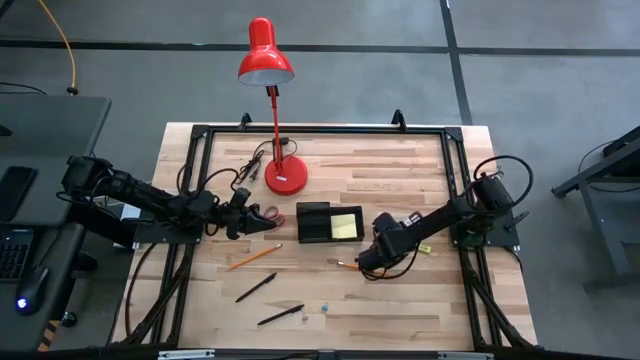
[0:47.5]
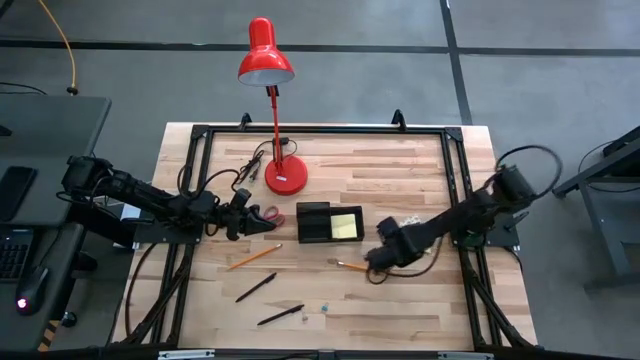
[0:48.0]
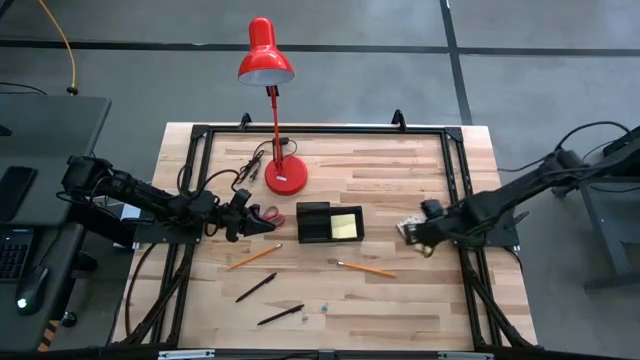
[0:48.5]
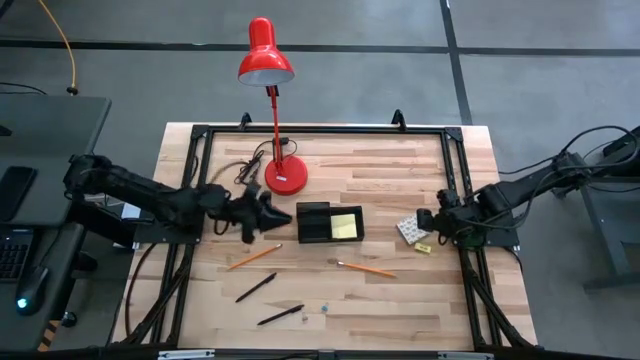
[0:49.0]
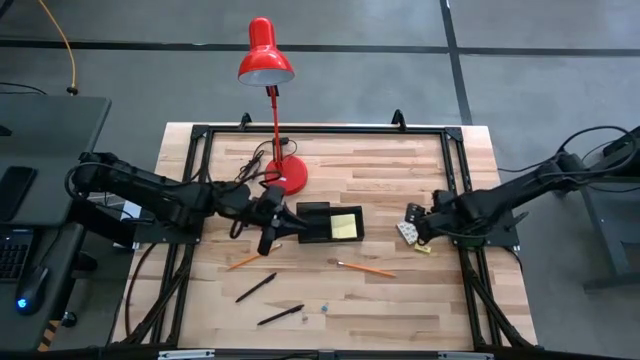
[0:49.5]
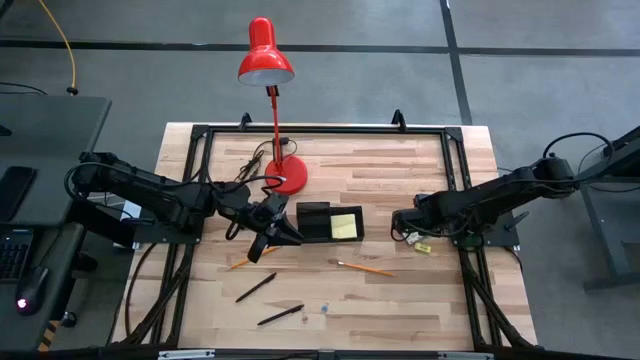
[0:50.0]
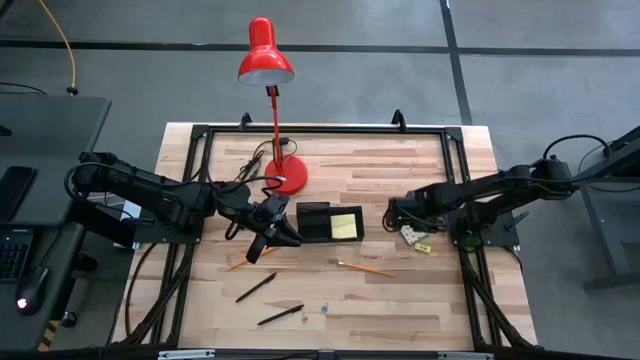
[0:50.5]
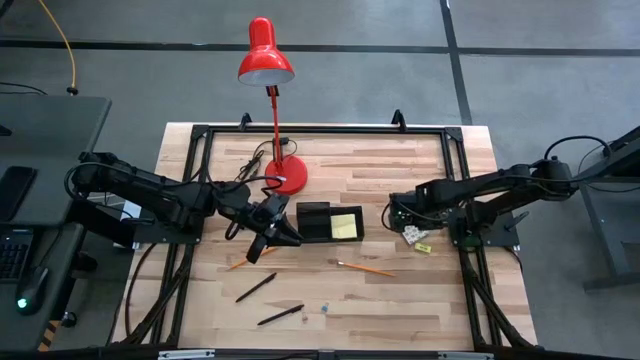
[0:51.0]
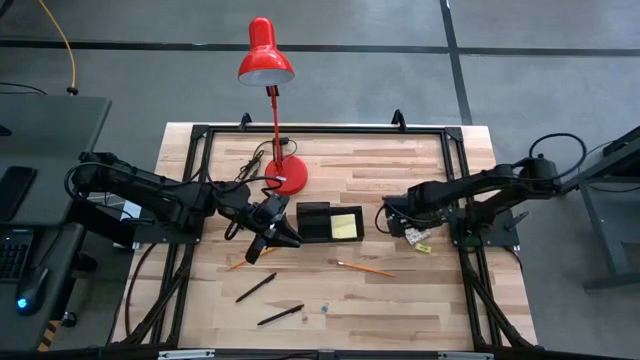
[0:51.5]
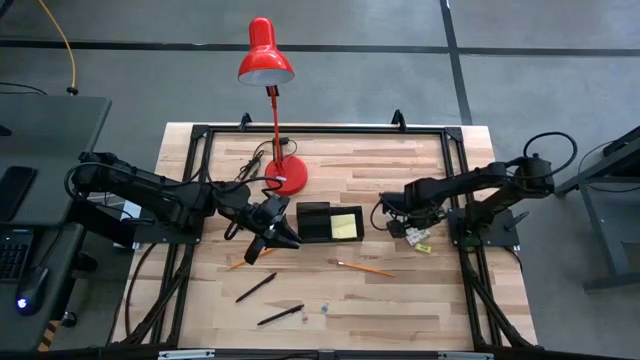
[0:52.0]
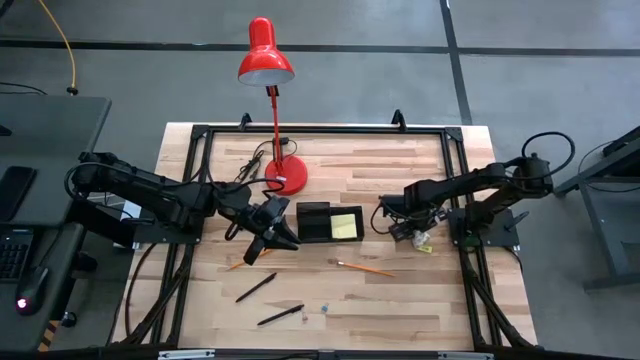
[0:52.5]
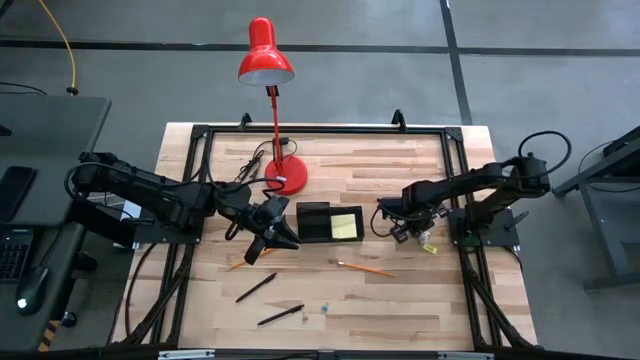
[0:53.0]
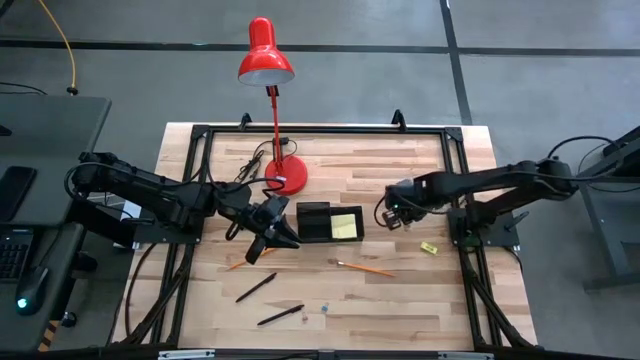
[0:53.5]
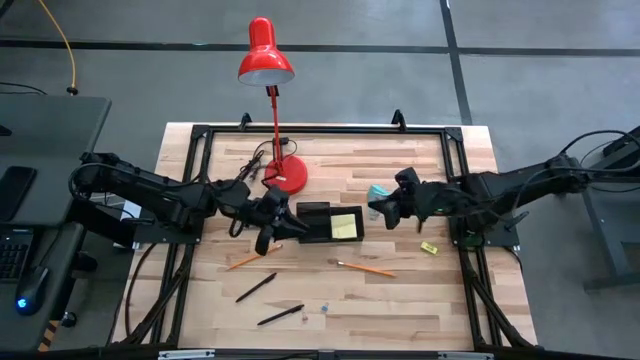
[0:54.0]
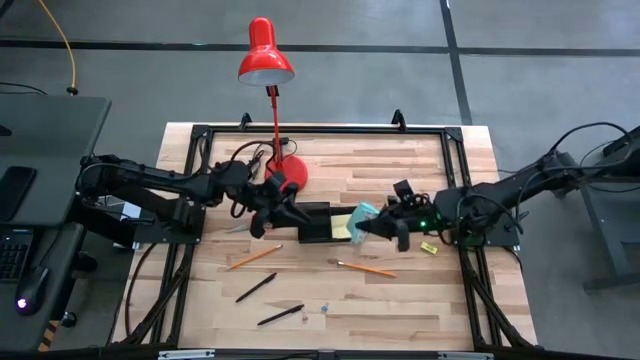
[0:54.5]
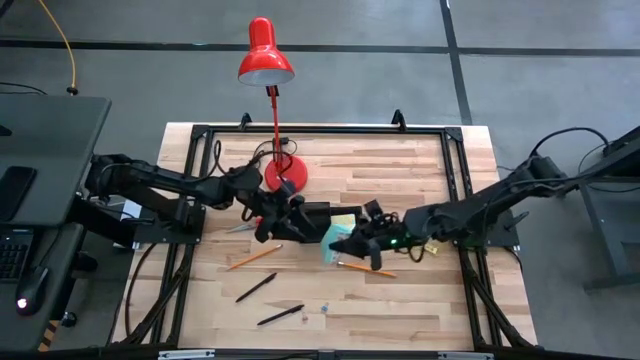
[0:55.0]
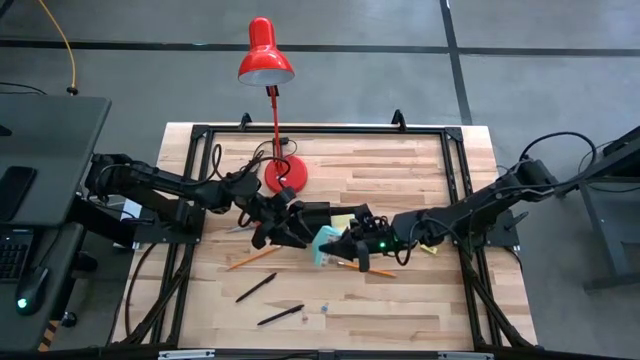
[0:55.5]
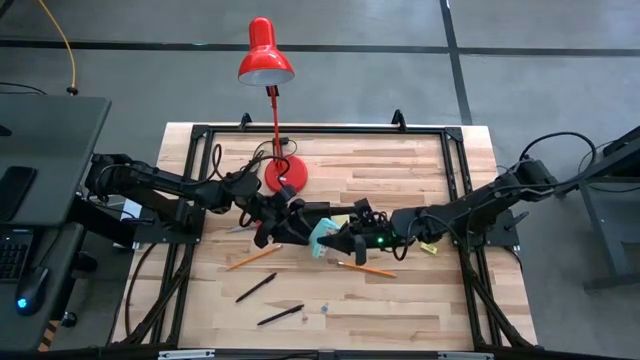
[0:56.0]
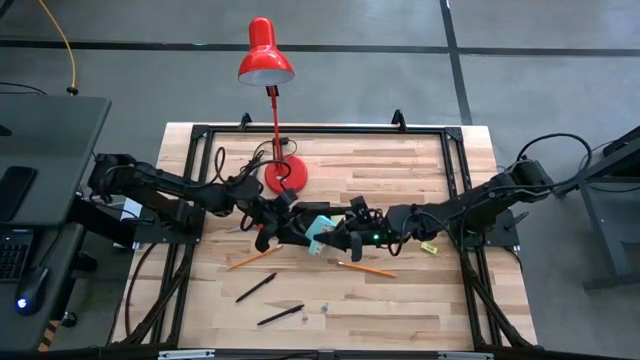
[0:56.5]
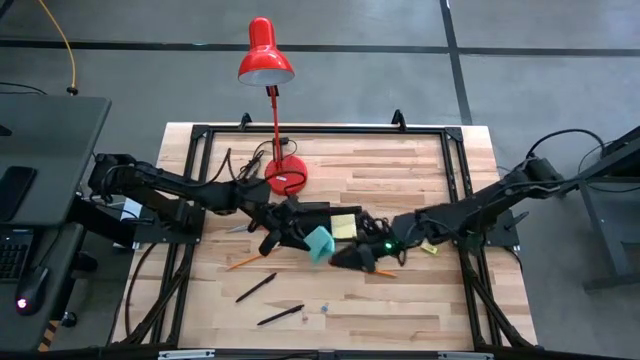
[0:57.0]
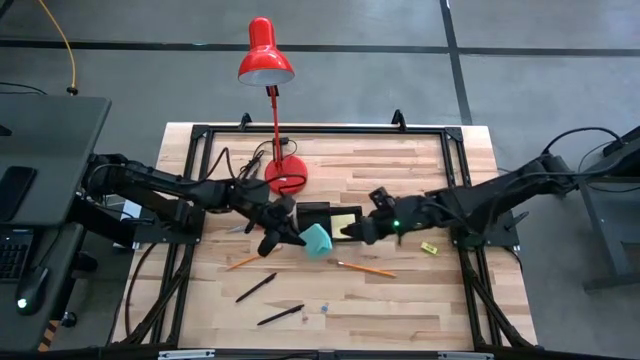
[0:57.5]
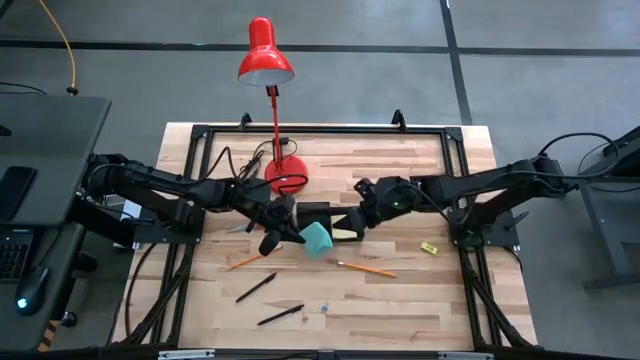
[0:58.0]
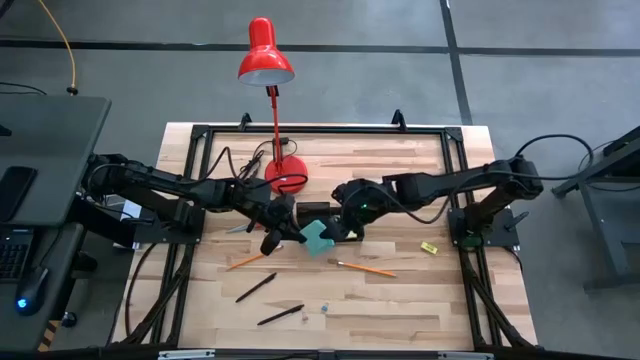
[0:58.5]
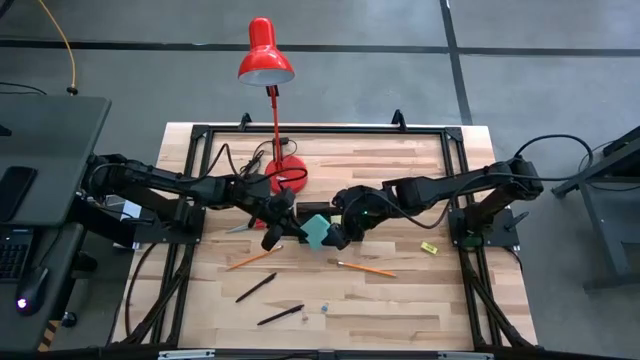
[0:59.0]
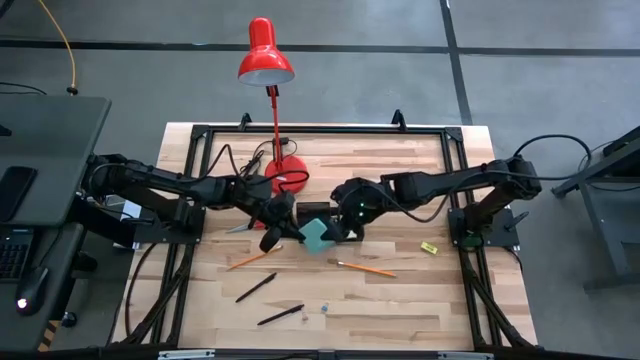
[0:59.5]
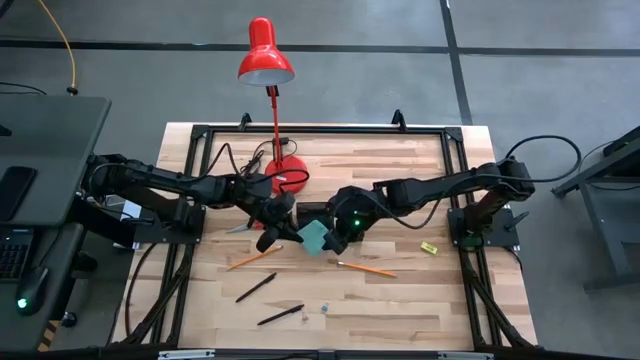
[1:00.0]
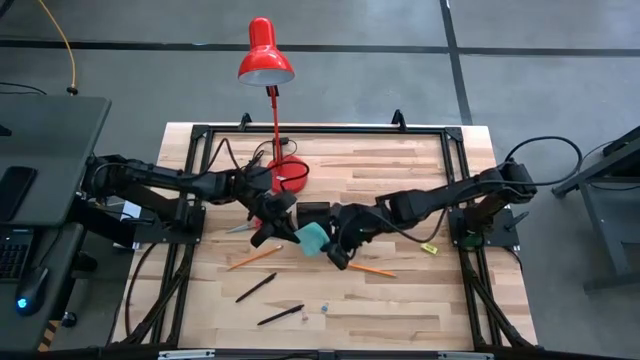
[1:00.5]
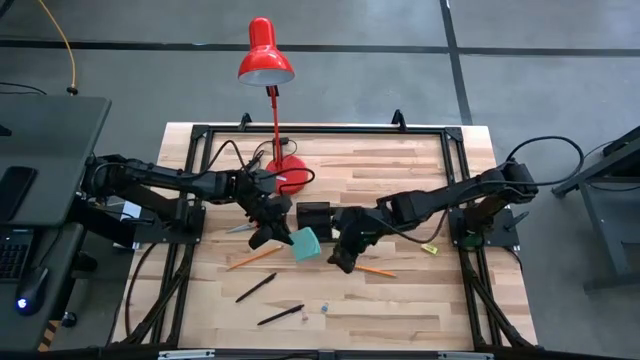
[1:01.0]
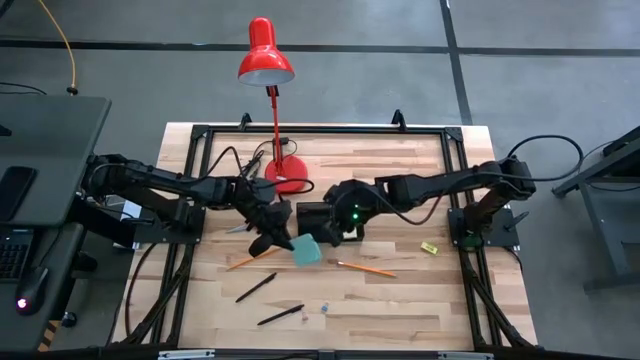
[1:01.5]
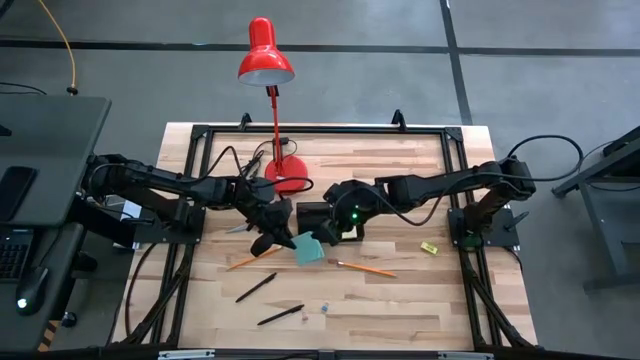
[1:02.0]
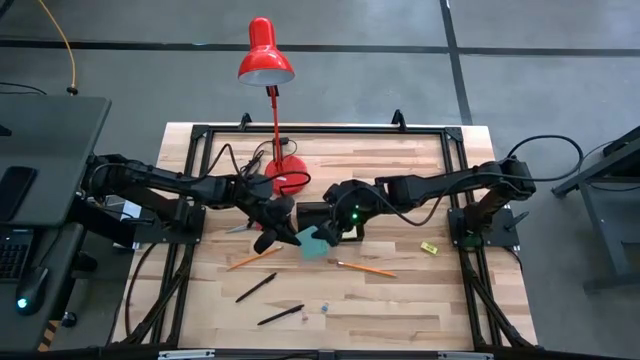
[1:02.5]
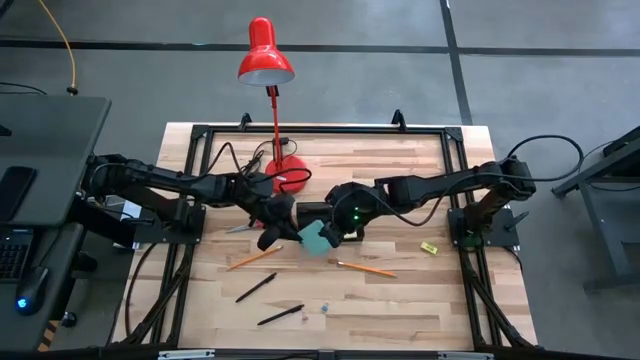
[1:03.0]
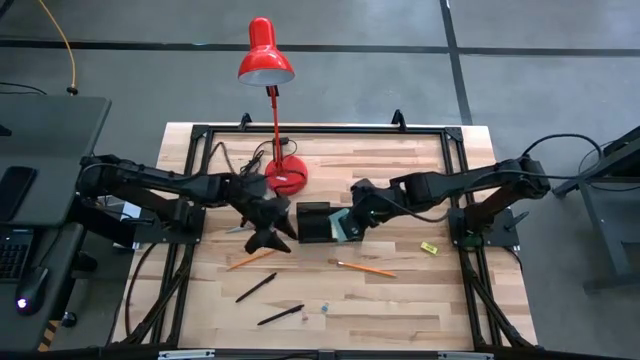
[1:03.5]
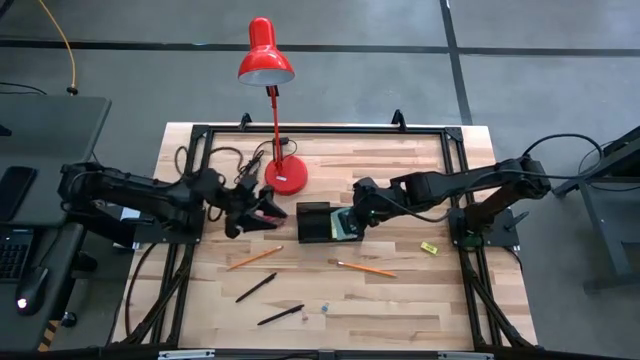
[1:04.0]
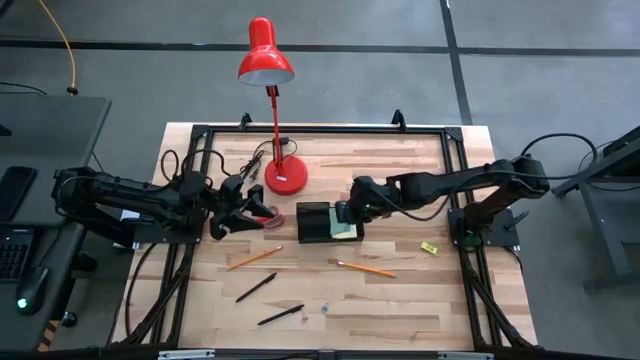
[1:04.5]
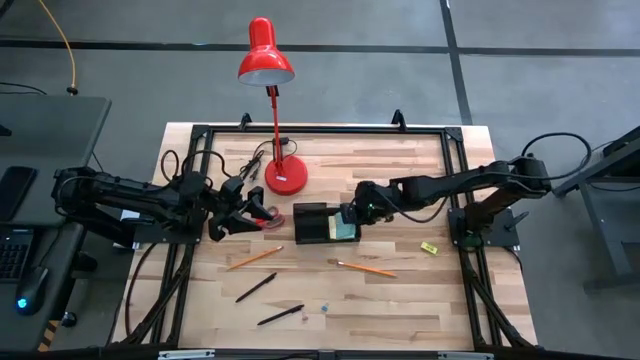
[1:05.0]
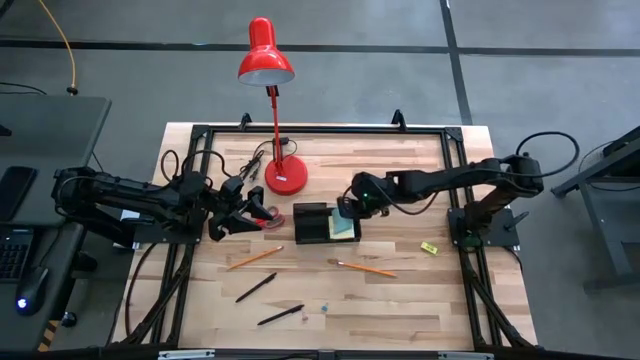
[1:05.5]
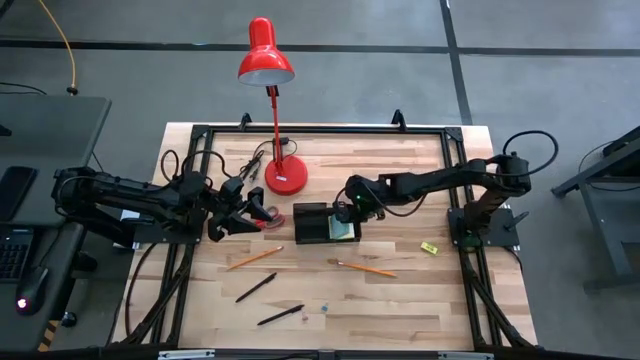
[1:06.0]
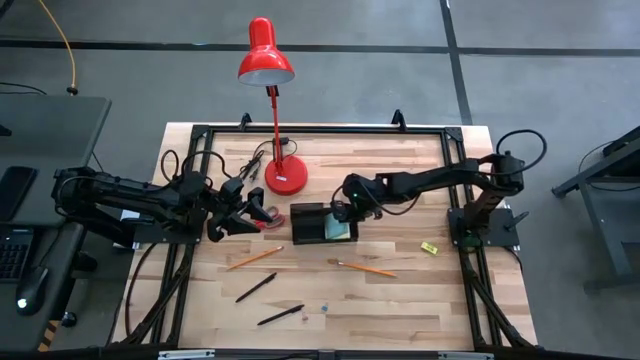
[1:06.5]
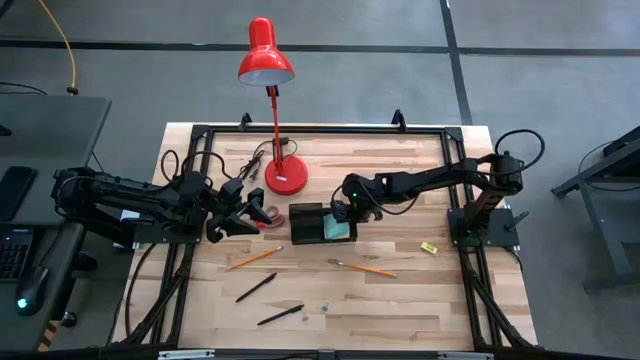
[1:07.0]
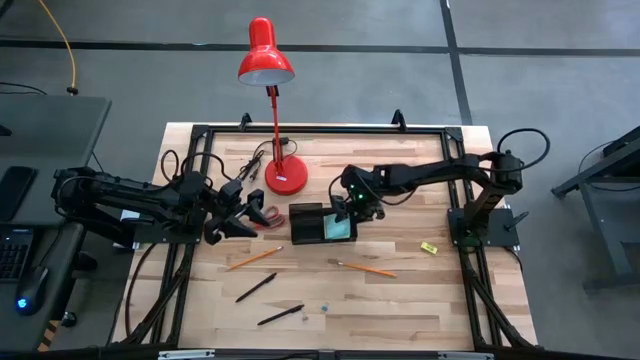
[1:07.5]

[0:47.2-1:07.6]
Task: Pick and place office supplies into organizer
Put the blue sticky notes into the black desk organizer
